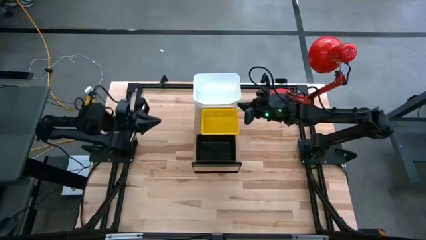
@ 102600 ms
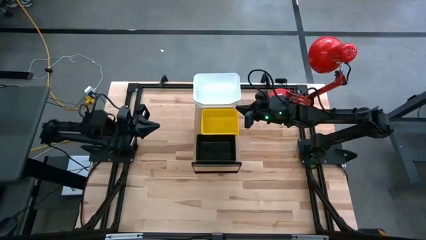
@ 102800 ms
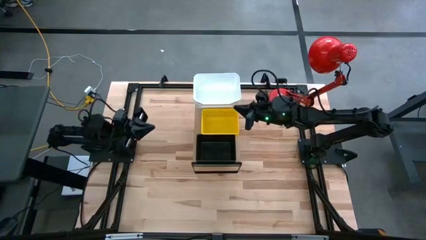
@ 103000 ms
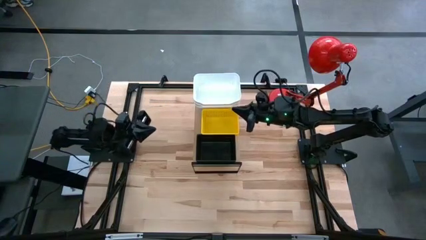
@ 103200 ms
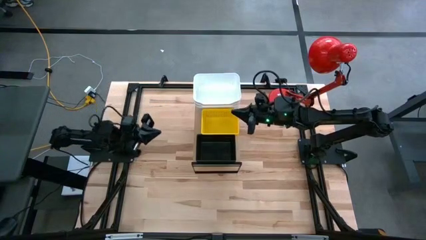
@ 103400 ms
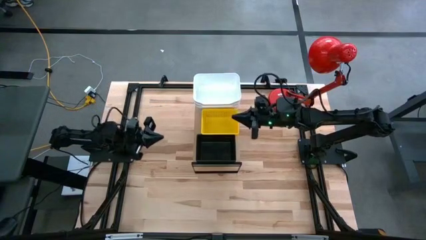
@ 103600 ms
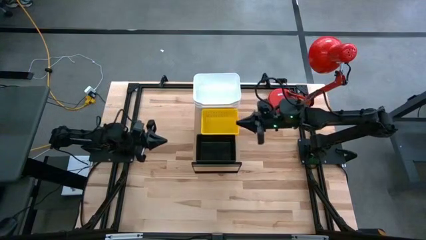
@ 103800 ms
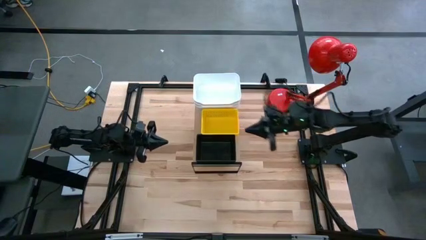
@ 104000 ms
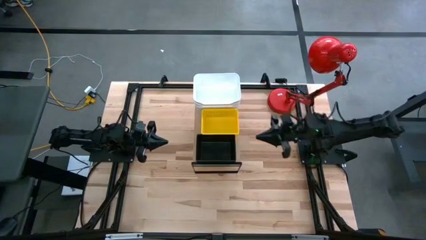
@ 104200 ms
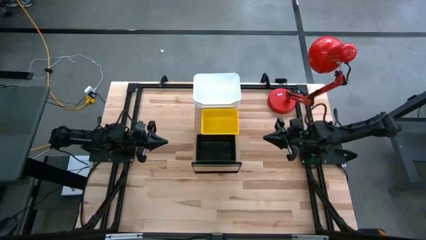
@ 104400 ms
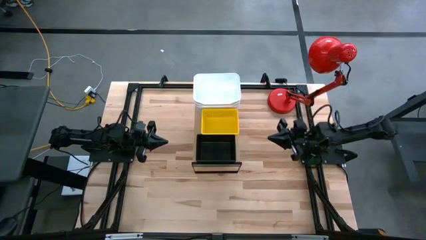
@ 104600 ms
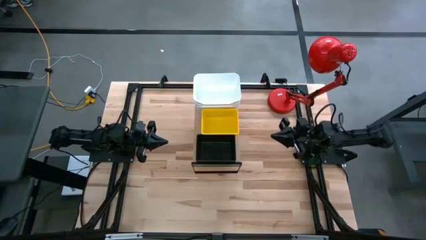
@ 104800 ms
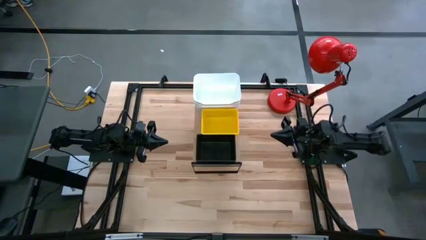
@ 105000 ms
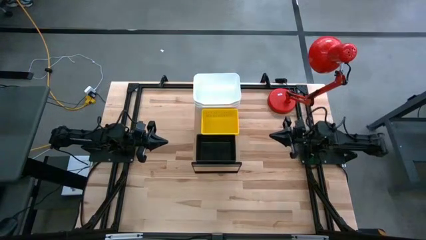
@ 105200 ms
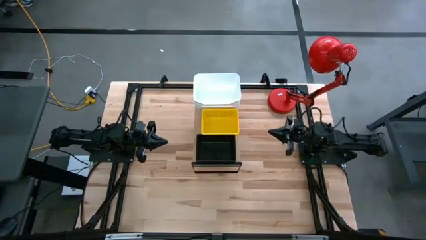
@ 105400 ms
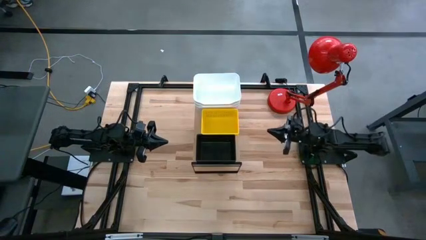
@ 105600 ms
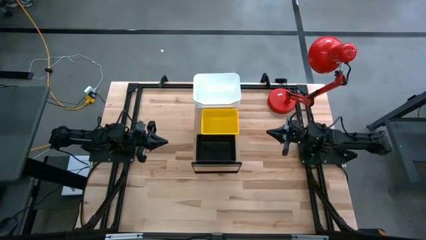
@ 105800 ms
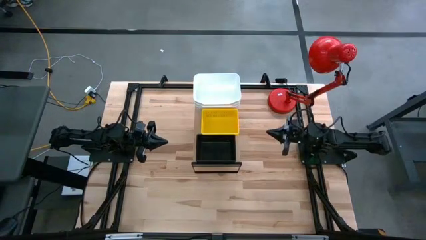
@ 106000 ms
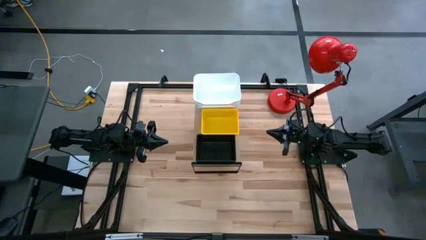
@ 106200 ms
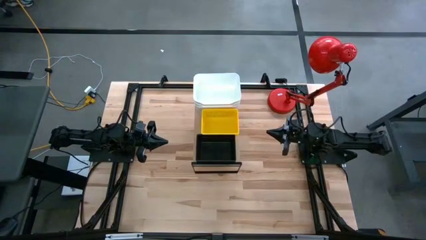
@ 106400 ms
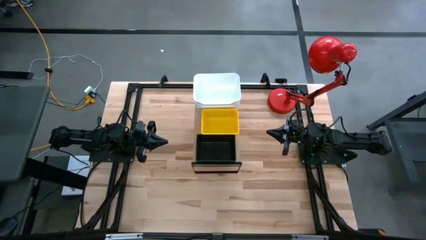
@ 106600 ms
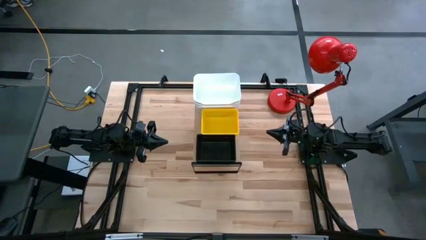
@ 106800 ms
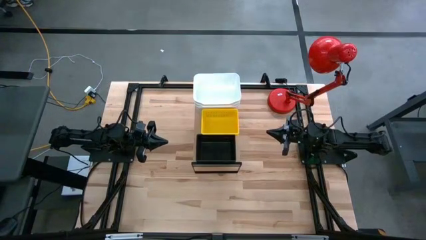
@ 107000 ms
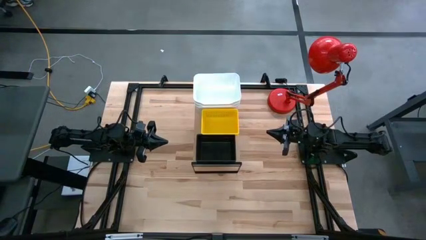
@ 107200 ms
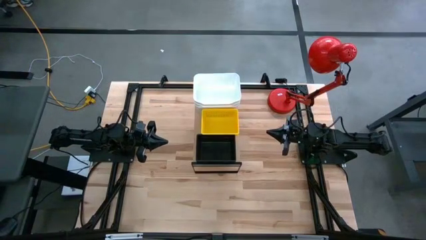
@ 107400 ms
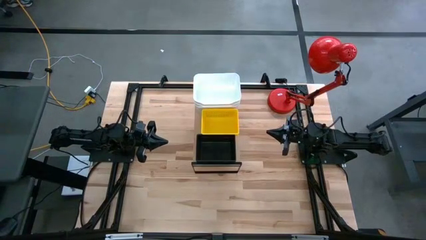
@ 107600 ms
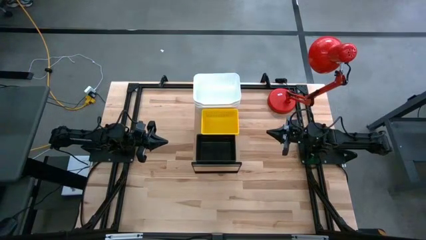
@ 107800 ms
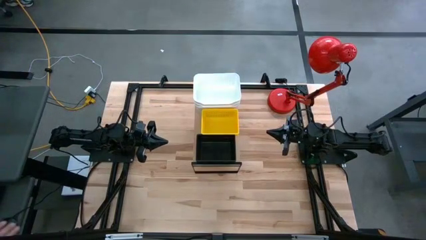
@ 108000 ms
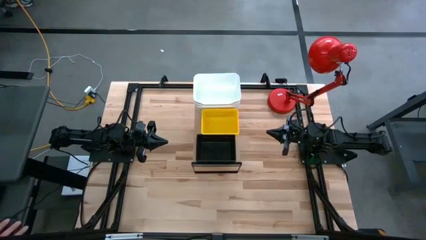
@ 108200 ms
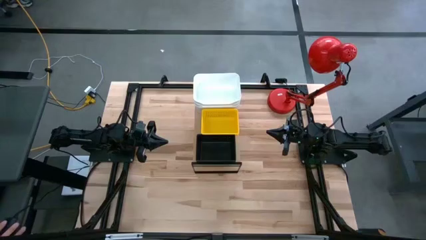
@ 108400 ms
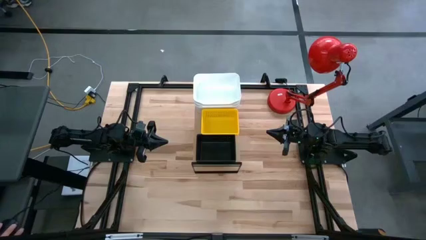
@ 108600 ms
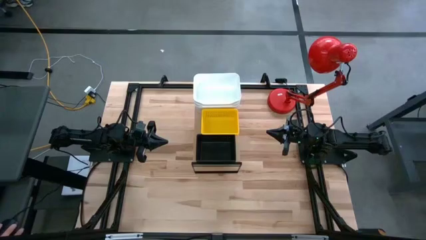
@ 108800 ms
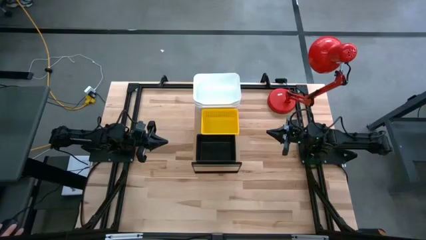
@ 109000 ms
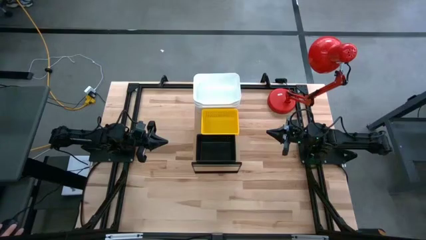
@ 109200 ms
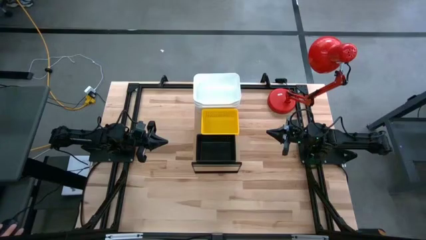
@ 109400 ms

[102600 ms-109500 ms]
Task: Stack baskets on shelf by color
Return to Home Position

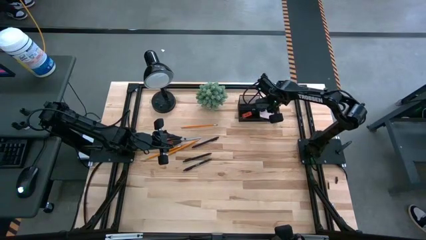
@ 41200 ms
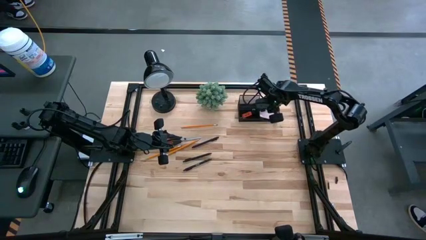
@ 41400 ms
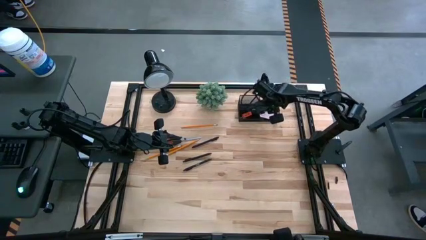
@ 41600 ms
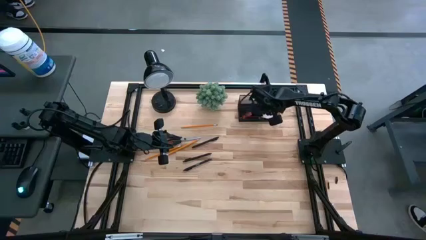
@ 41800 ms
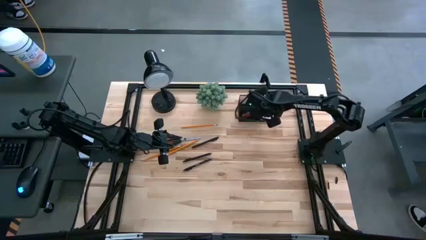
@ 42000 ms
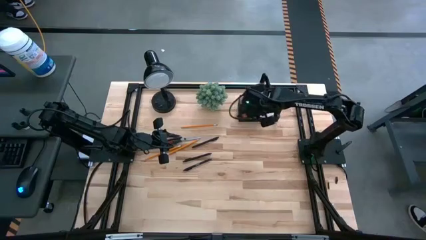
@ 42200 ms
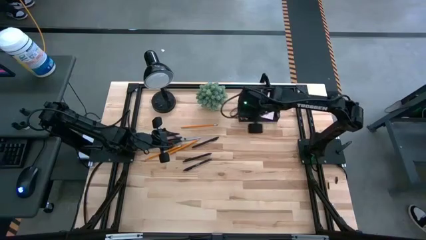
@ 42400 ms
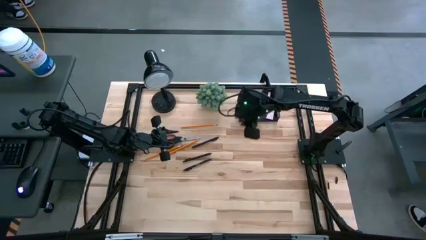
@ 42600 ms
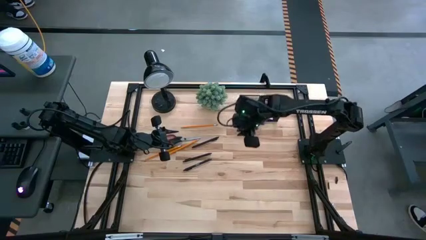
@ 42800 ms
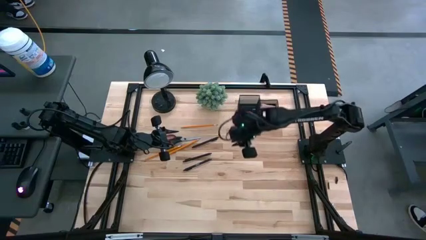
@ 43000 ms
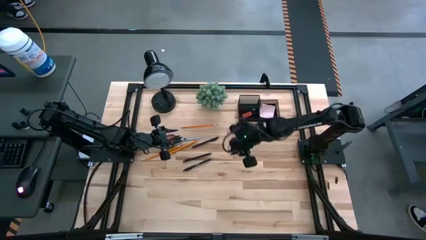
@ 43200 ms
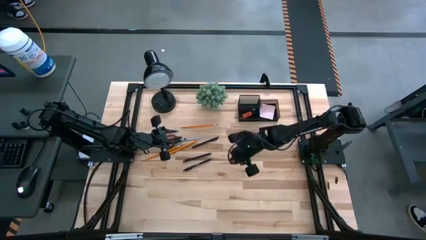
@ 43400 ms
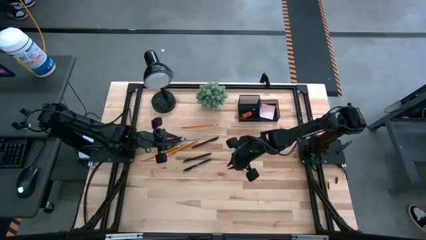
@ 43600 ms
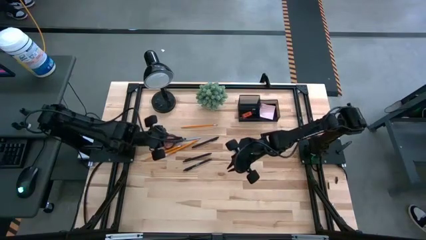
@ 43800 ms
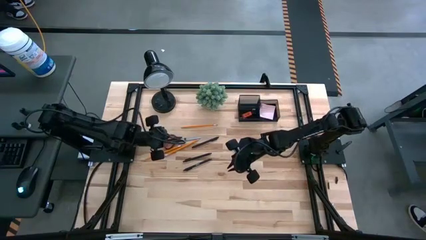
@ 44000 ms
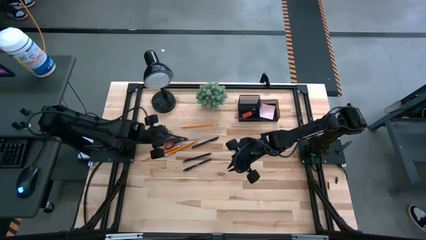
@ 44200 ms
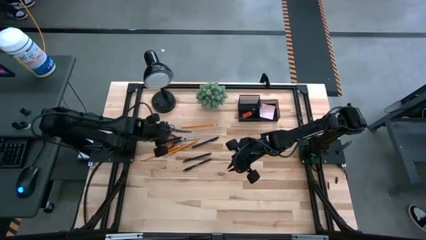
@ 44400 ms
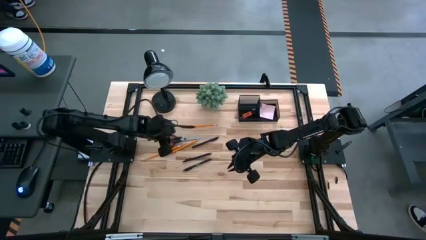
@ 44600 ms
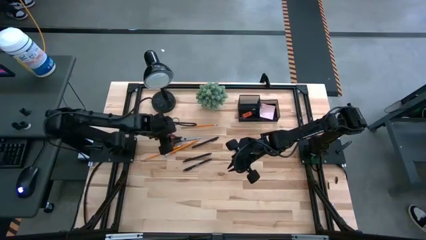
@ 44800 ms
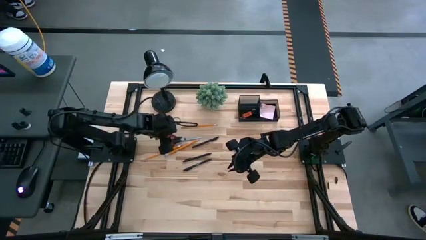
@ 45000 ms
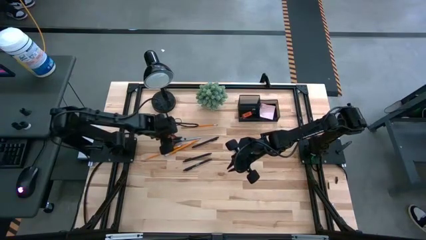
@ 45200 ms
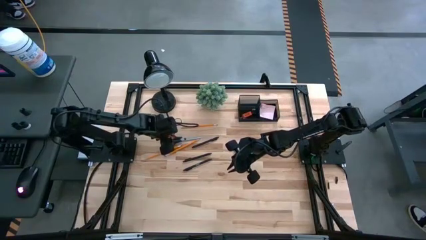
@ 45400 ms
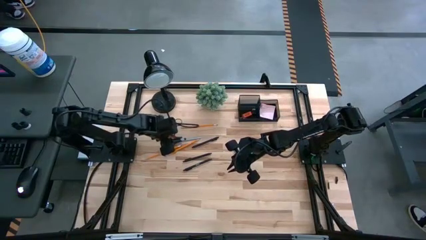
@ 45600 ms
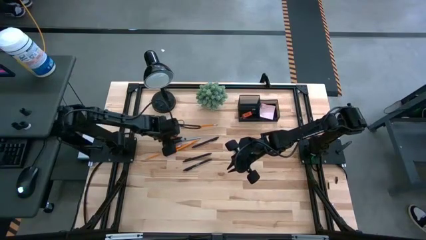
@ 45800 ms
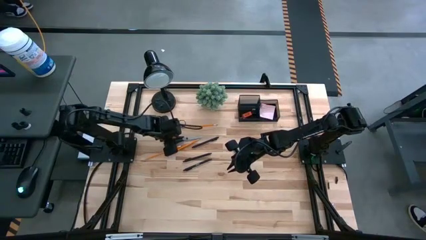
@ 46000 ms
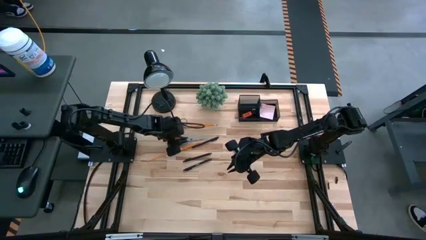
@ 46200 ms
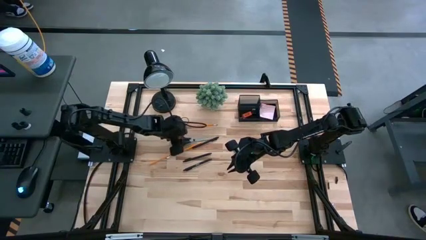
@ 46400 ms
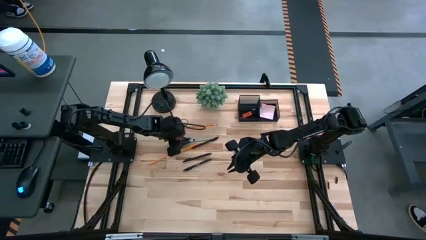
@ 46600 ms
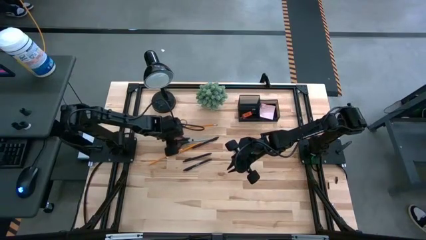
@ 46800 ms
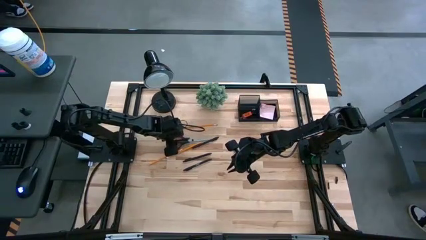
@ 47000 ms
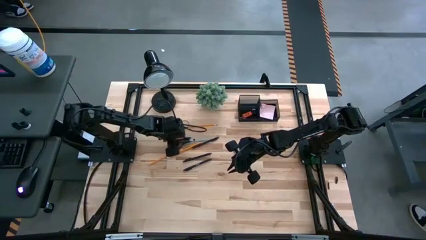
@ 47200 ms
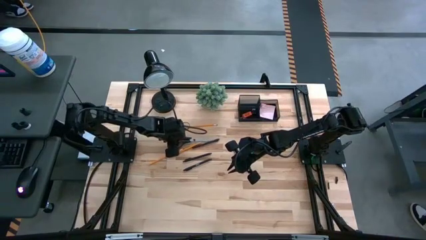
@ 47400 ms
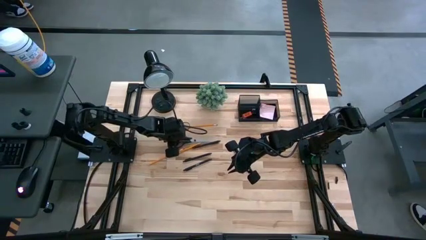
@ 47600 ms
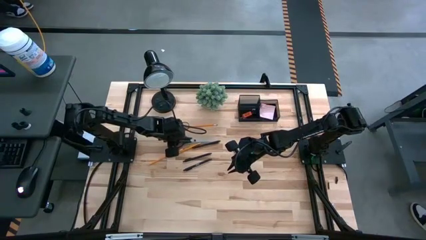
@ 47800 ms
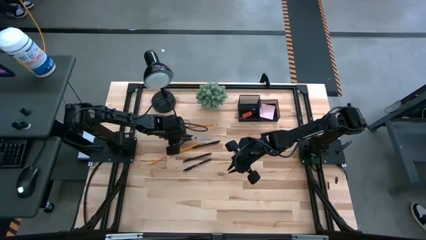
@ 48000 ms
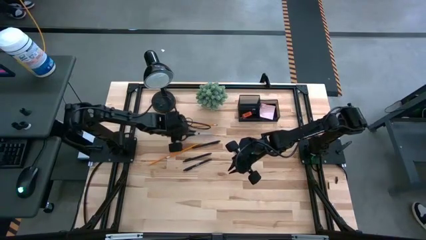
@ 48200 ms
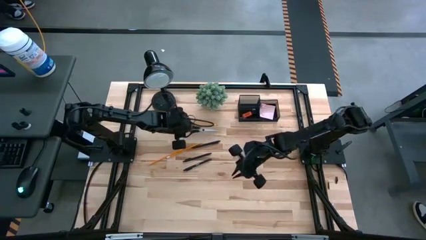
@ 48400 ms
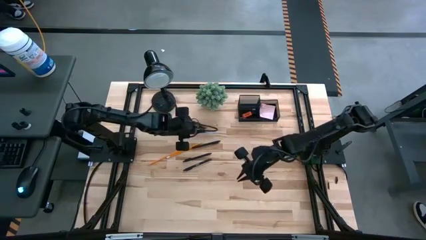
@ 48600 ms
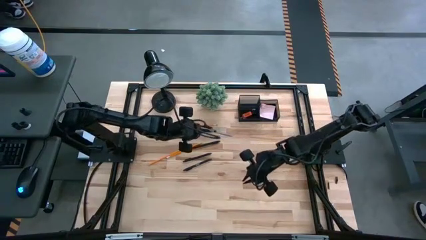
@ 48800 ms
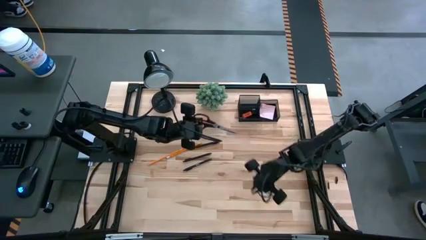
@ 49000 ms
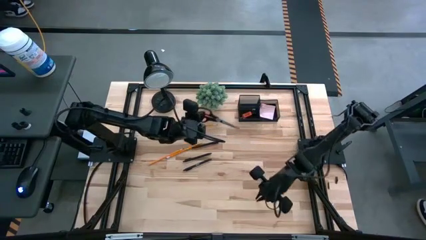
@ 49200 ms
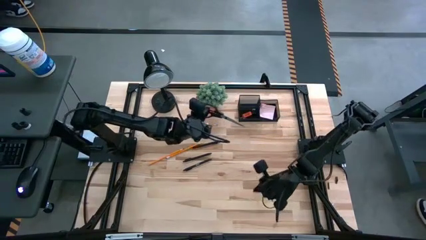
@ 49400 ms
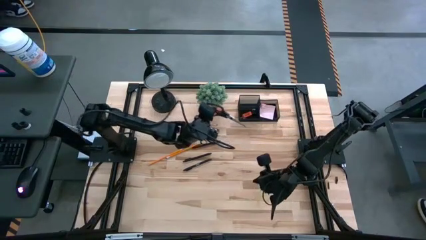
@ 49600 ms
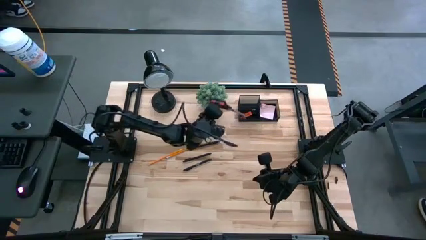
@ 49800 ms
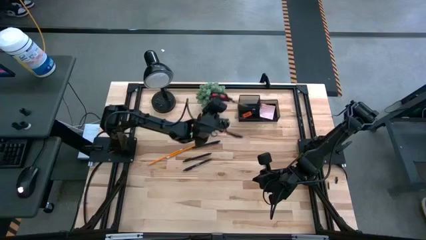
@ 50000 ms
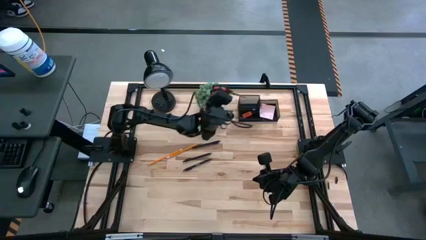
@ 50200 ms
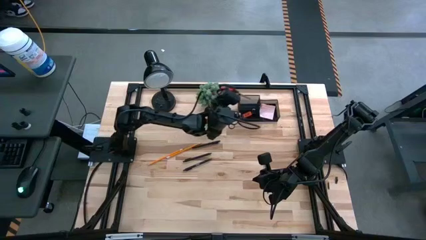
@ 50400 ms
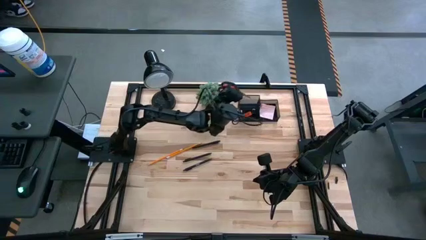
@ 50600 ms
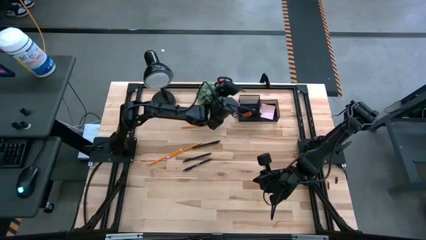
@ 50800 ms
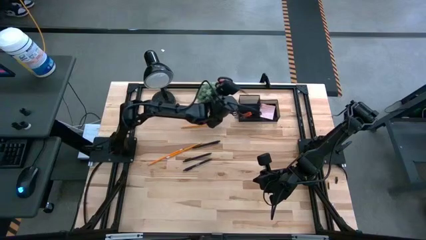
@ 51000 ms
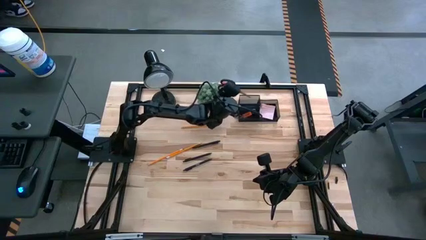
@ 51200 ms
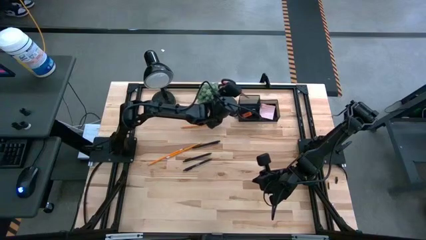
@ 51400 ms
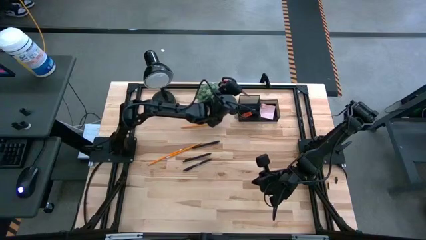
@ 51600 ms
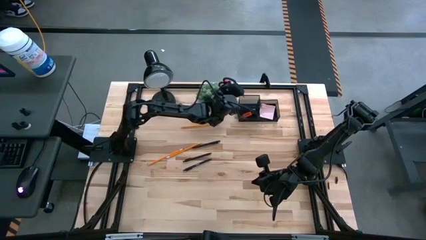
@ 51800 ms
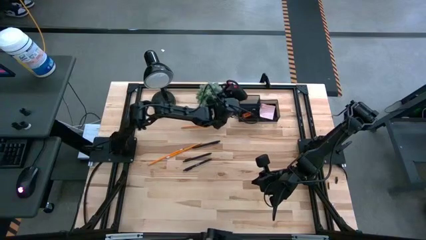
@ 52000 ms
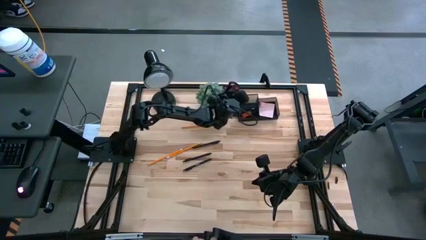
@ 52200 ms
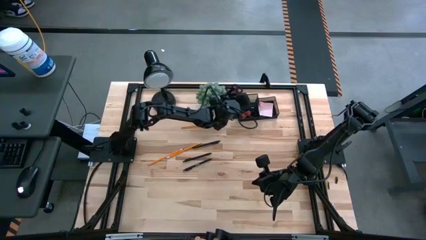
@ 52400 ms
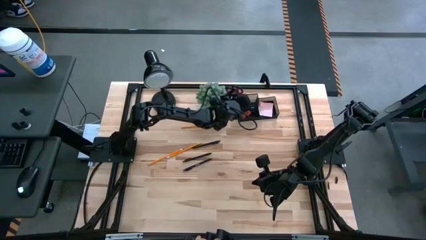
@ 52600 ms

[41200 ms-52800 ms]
Task: Pick and place office supplies into organizer
Put the black scissors into the black desk organizer
